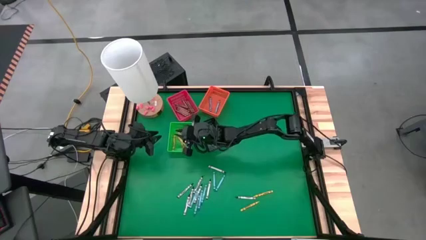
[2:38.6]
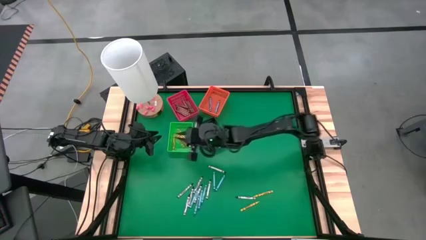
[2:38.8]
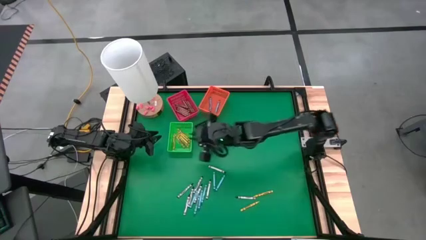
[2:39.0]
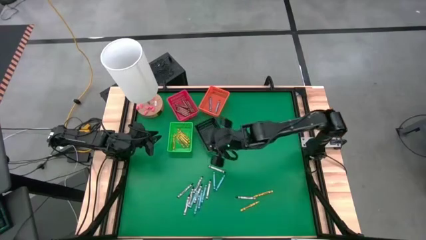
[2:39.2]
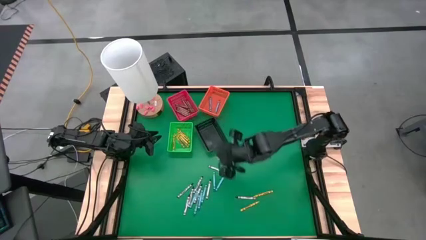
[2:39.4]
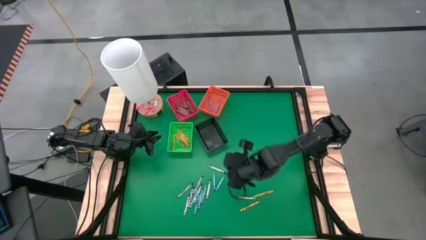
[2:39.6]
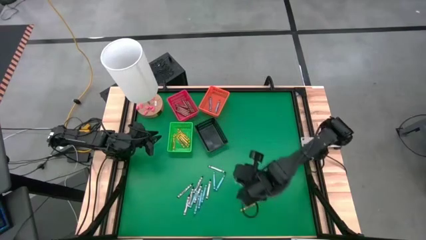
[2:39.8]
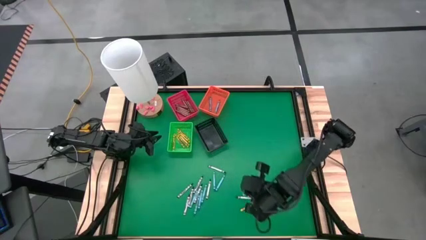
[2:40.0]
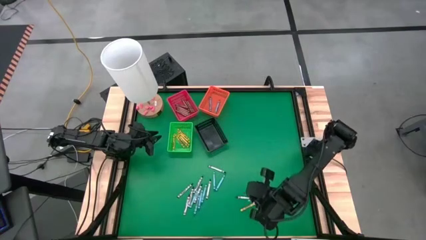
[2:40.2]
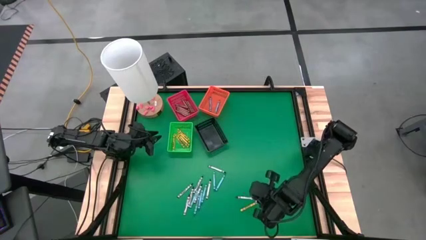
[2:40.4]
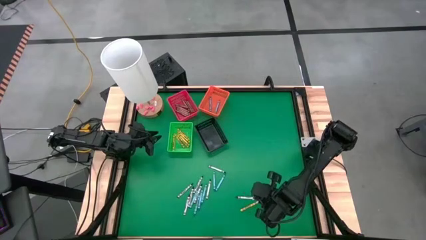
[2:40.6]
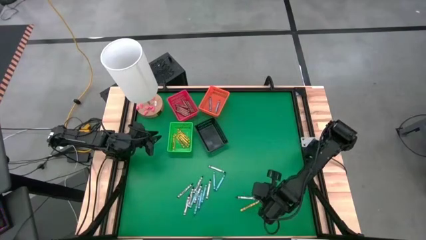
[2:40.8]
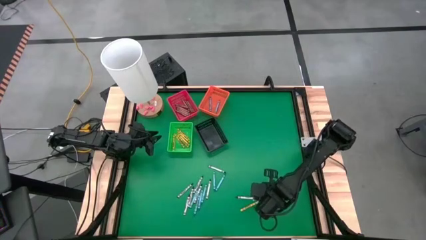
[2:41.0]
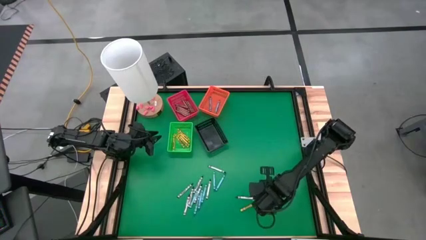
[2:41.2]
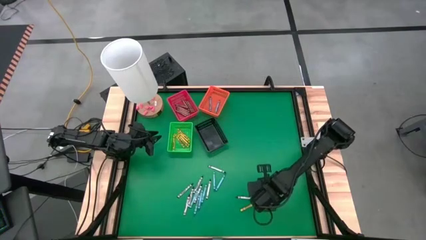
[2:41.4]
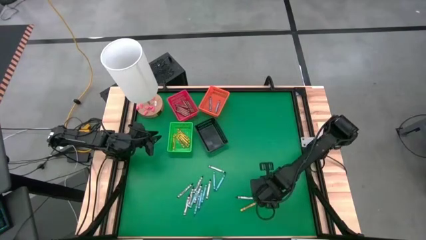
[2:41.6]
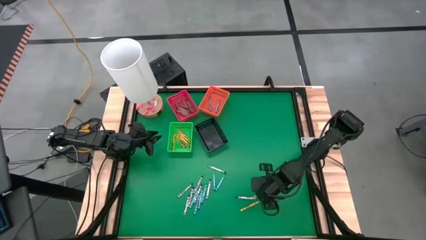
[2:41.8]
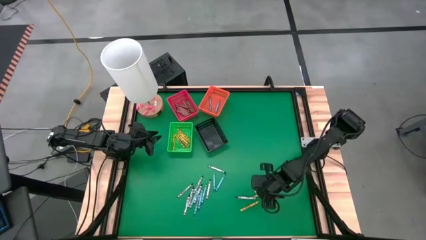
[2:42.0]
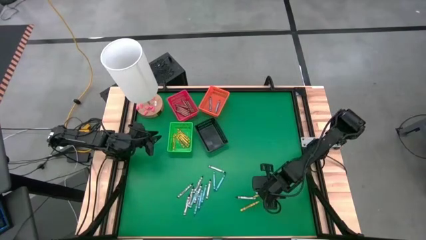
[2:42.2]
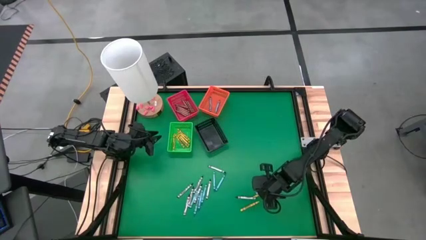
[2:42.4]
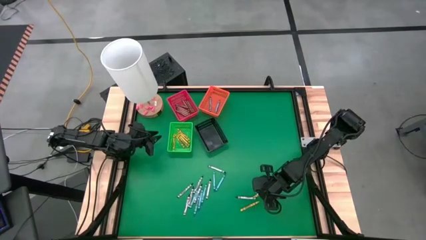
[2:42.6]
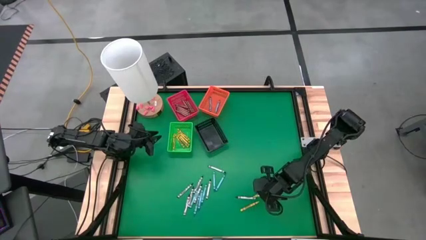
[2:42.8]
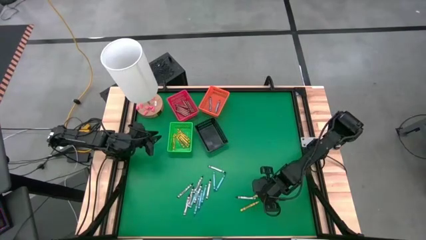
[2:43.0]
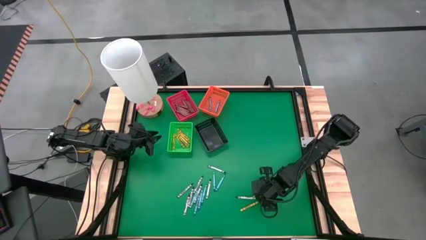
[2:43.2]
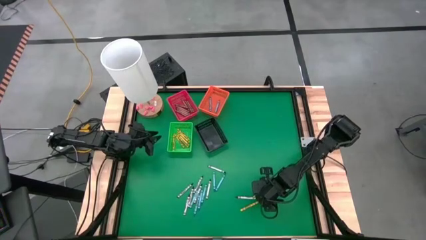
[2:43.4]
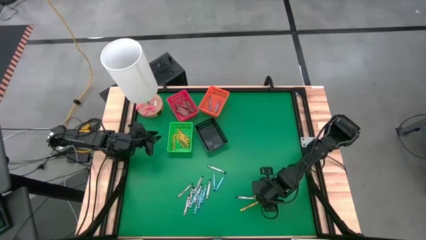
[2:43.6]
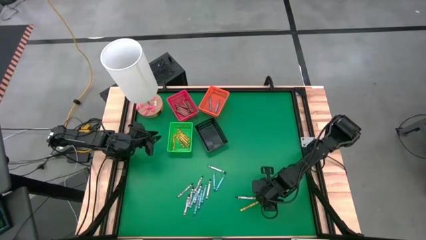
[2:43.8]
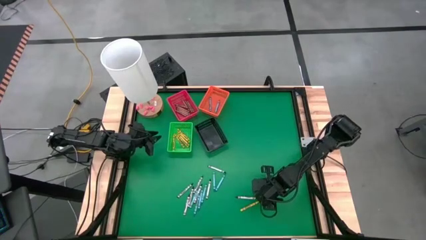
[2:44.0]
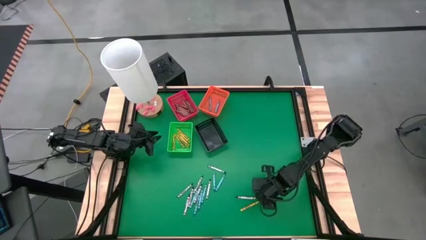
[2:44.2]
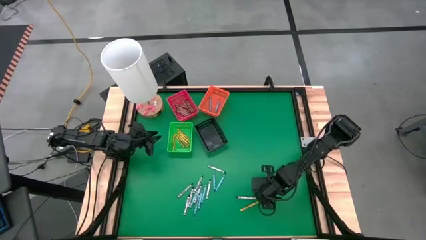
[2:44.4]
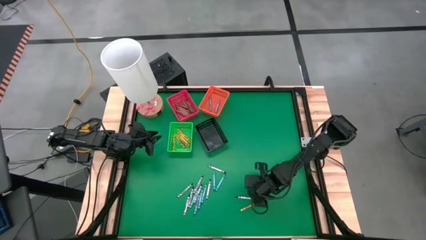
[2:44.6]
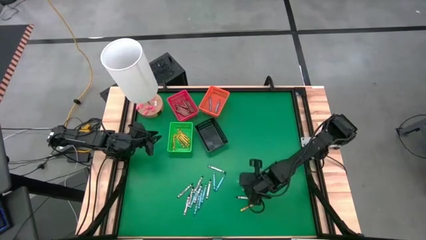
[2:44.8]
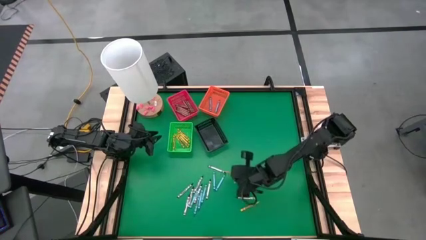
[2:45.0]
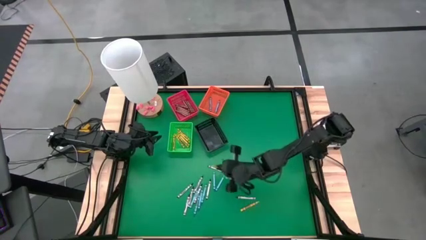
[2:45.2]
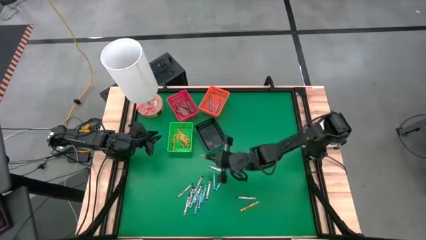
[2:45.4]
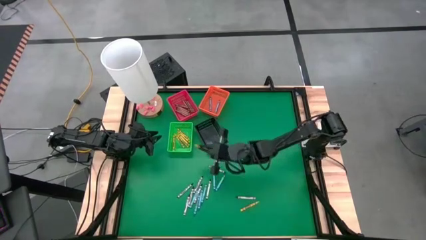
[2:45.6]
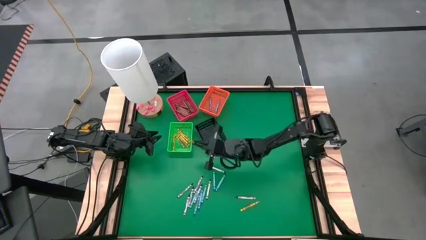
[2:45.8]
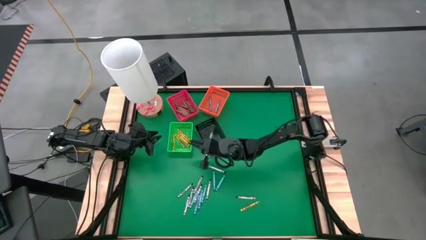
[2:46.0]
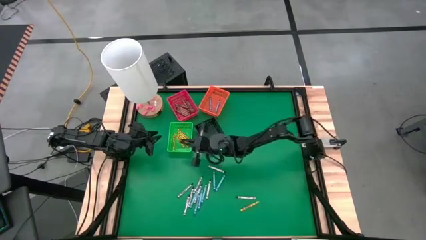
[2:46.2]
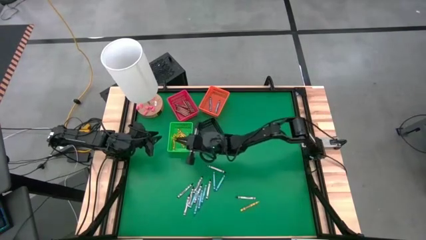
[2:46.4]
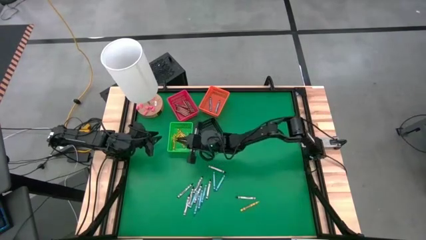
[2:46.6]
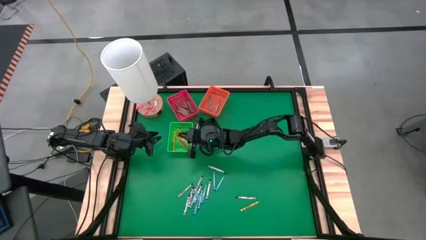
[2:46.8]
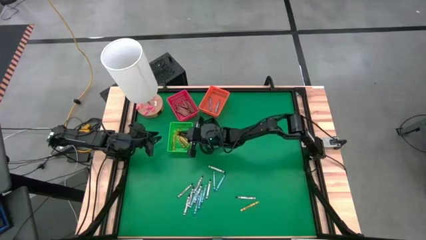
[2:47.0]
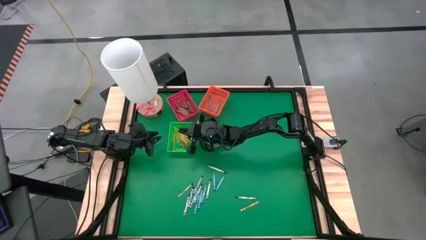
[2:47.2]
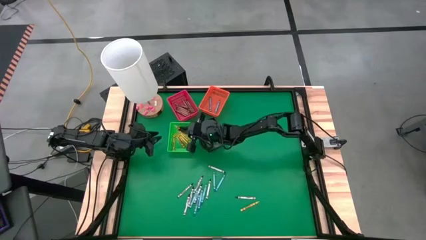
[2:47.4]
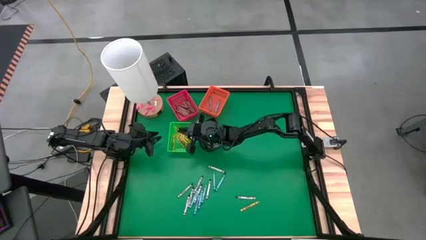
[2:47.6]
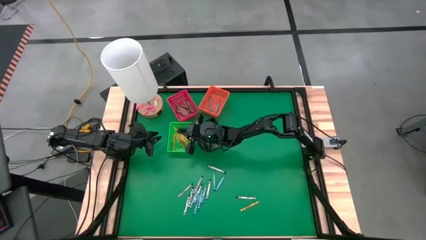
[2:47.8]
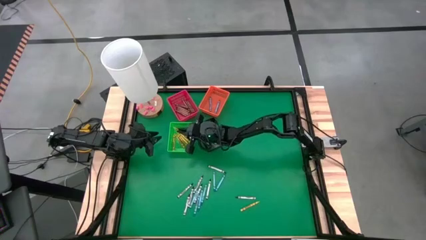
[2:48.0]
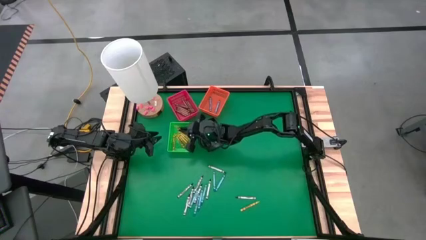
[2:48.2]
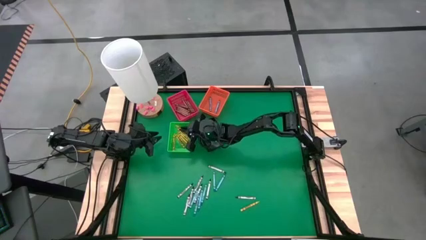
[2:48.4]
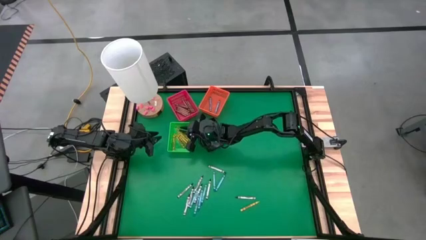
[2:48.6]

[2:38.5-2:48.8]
Task: Sort crayons
Put the yellow crayon into the green bin

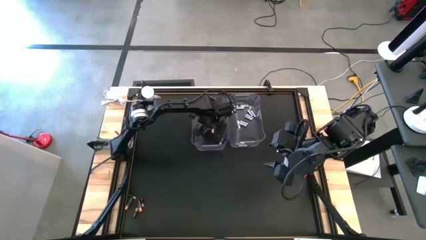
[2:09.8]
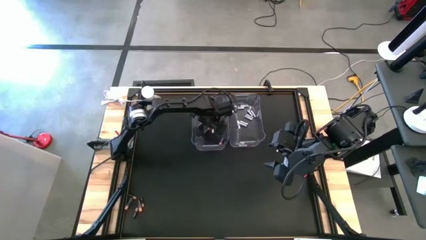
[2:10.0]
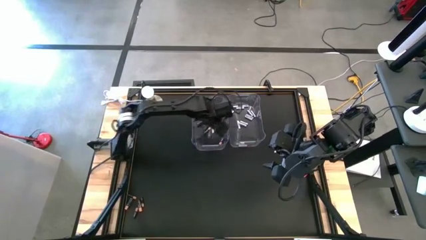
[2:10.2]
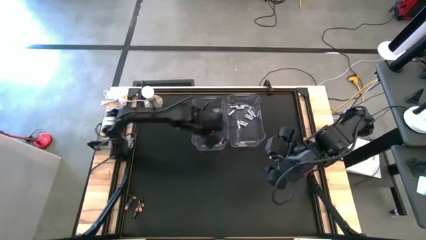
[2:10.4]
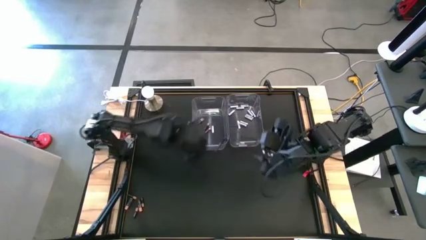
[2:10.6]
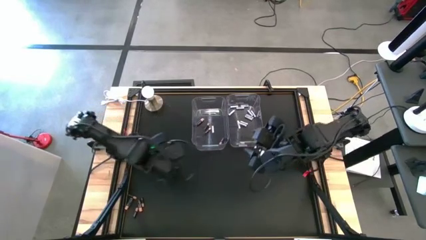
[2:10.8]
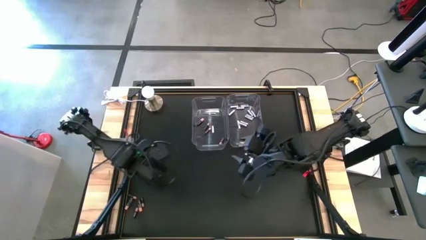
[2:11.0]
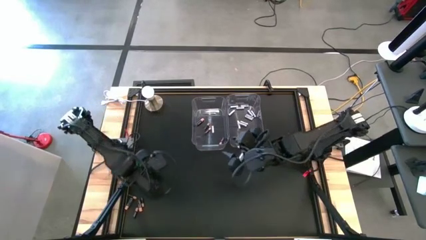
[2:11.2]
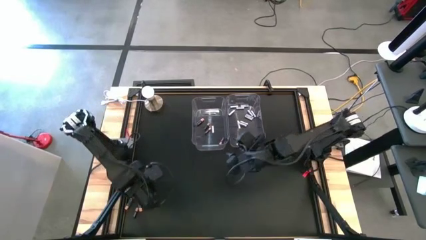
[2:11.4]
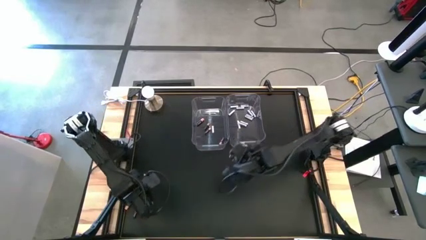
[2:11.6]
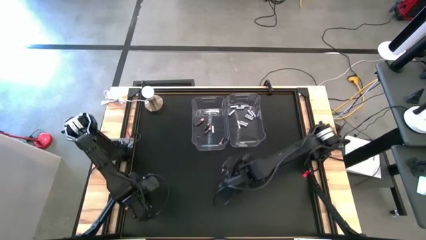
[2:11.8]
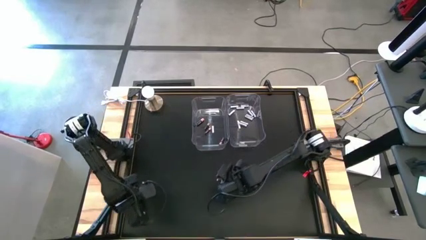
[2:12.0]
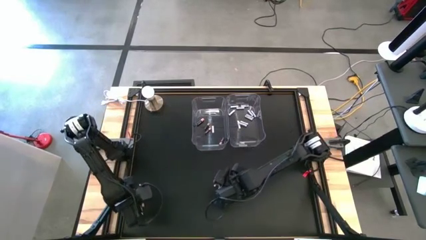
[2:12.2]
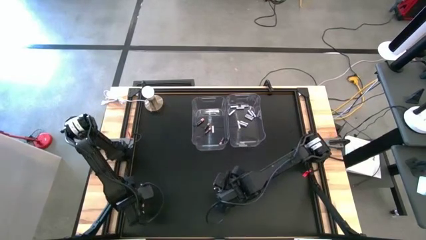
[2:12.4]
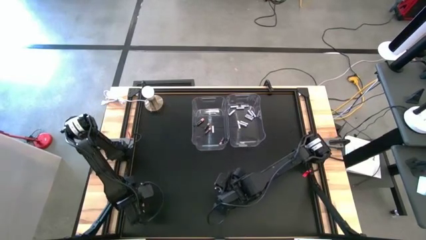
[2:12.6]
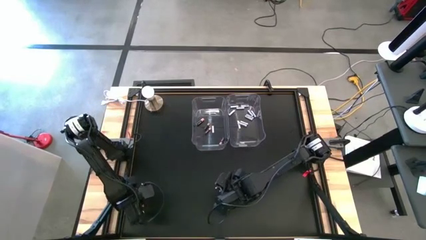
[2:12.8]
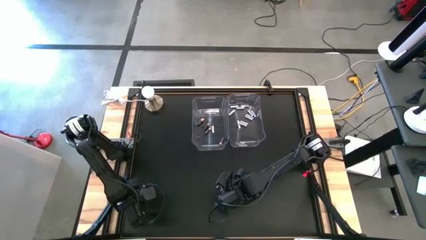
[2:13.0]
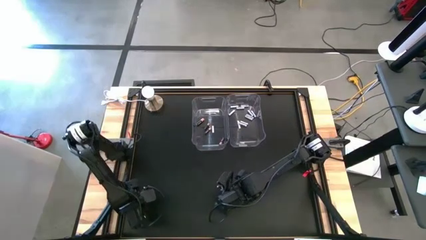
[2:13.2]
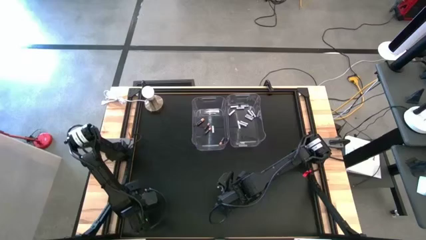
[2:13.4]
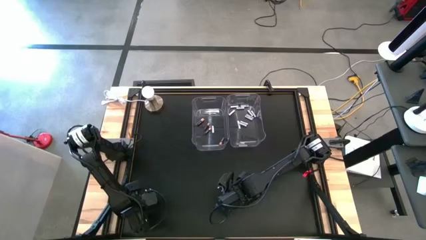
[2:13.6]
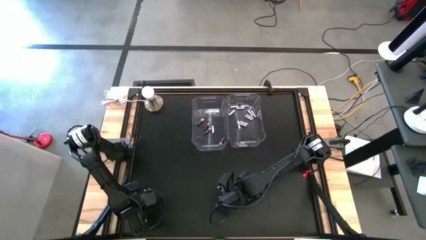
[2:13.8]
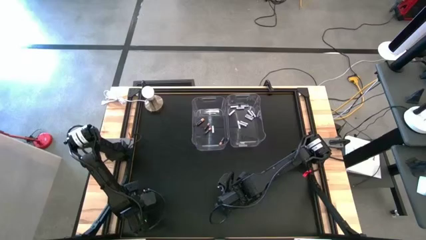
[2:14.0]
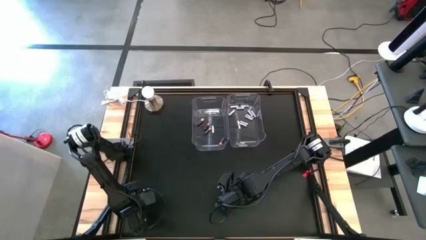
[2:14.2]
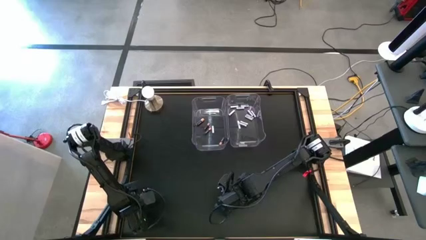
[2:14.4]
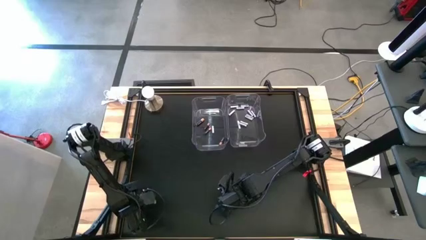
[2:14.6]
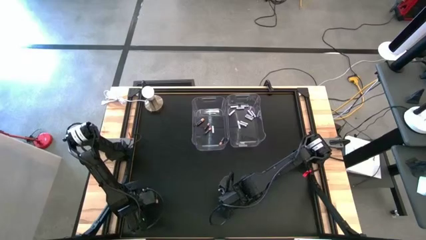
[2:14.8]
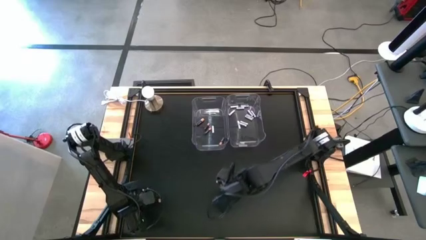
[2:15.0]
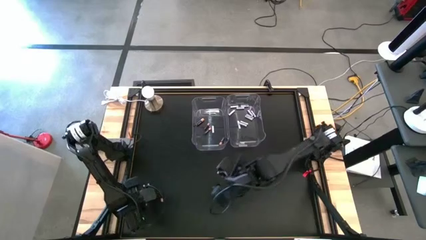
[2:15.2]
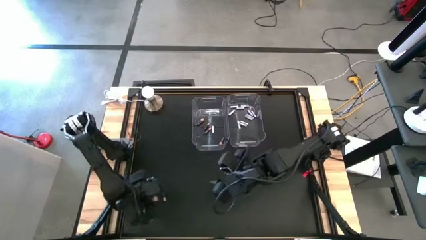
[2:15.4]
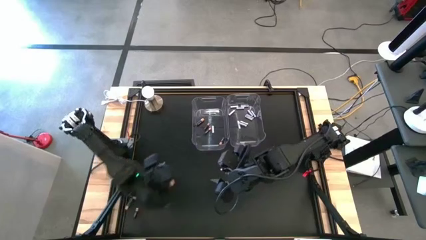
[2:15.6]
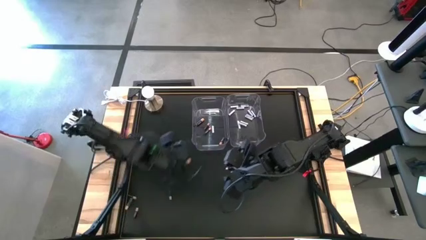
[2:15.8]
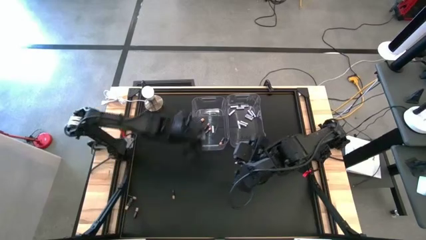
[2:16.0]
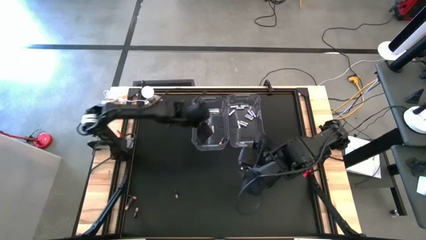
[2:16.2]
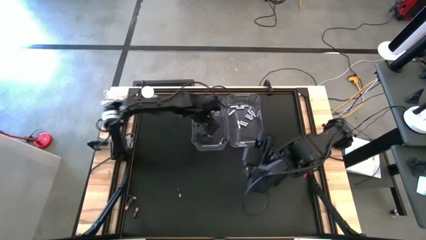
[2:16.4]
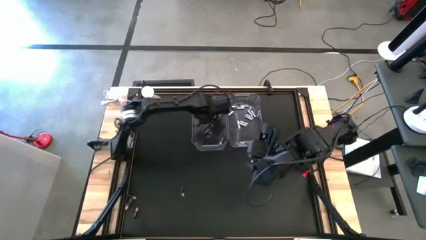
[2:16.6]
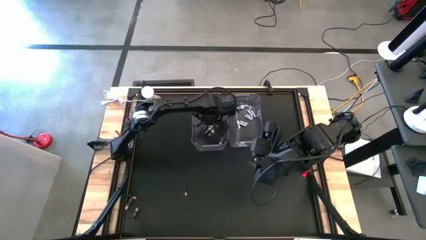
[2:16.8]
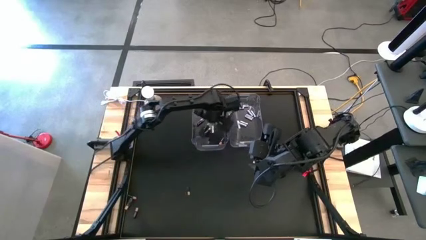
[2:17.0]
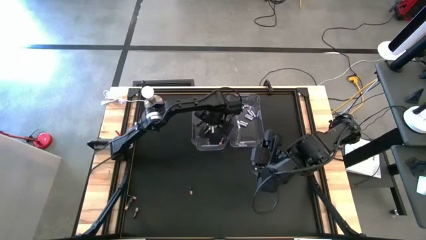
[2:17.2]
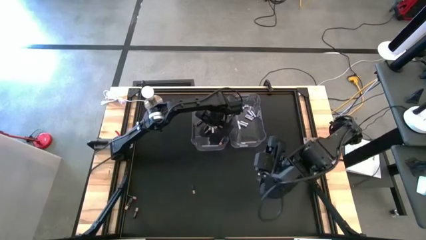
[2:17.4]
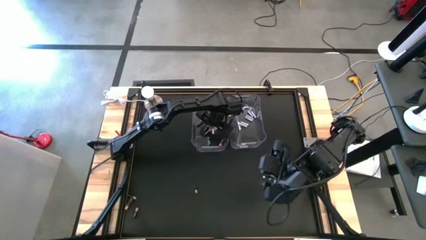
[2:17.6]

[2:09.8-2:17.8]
Task: Sort batteries
Put the black battery into the left transparent bin
